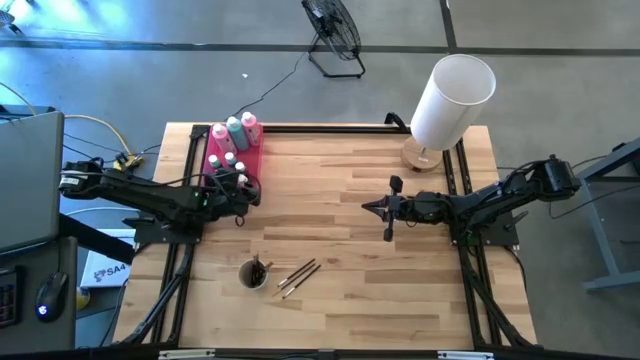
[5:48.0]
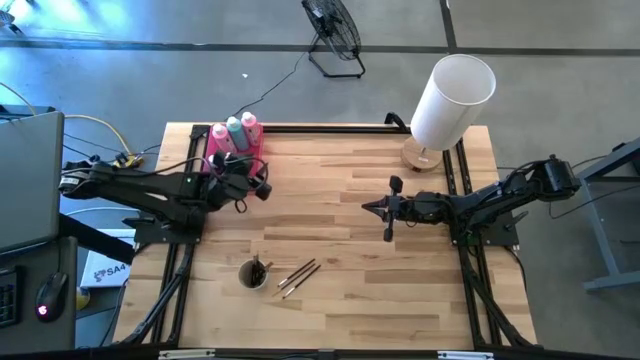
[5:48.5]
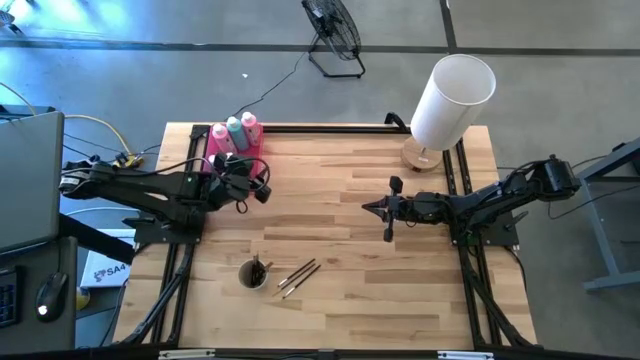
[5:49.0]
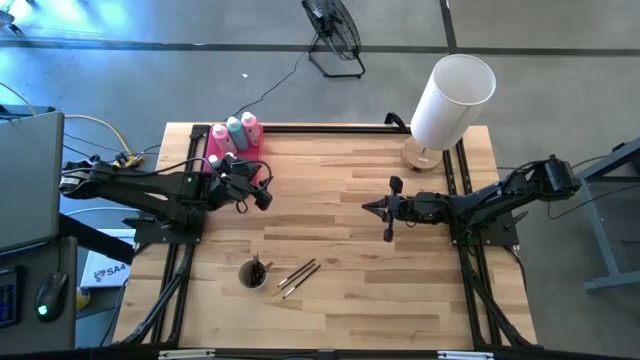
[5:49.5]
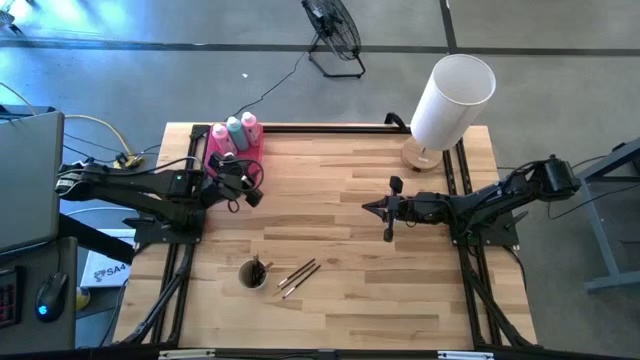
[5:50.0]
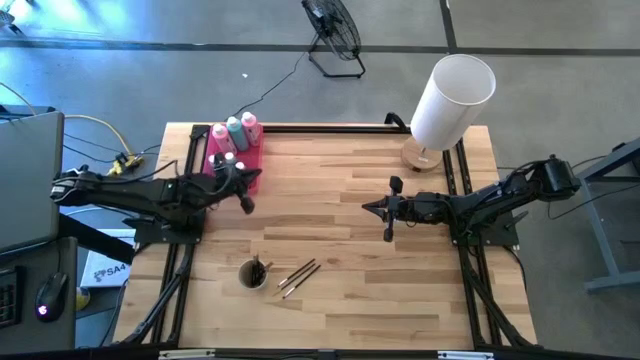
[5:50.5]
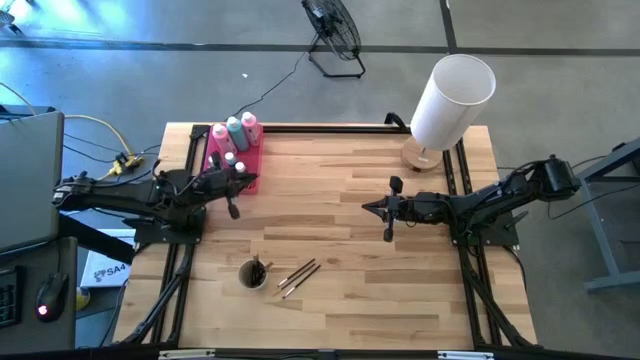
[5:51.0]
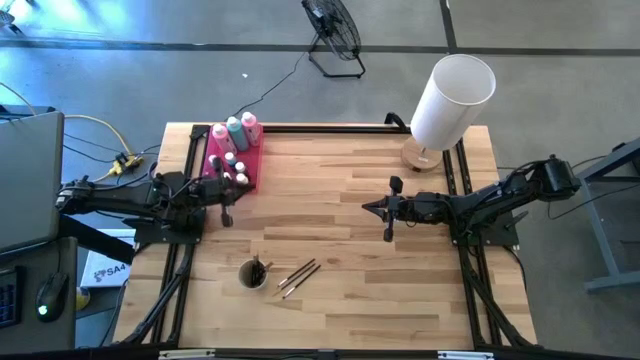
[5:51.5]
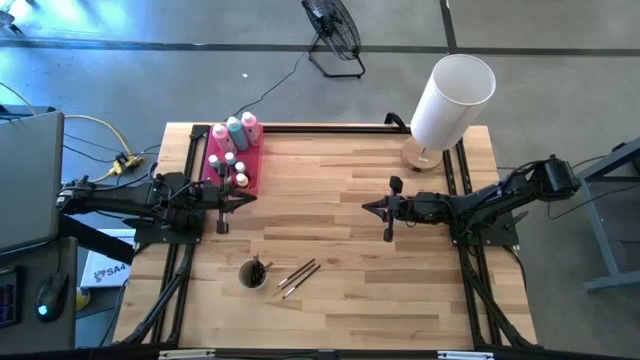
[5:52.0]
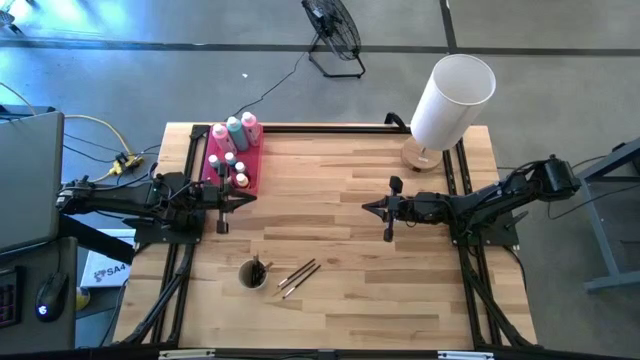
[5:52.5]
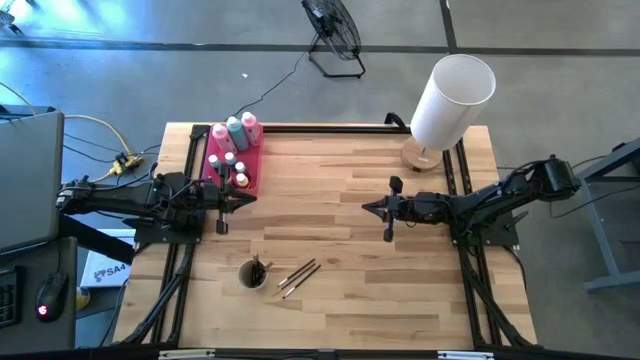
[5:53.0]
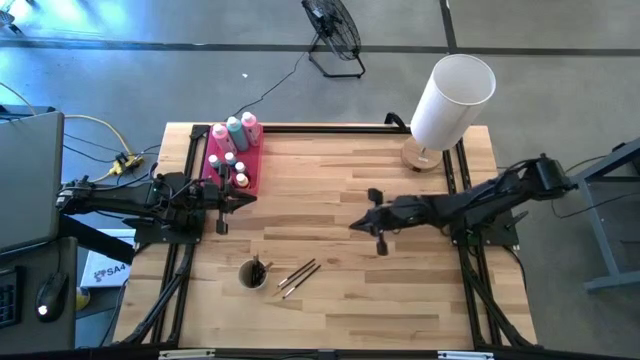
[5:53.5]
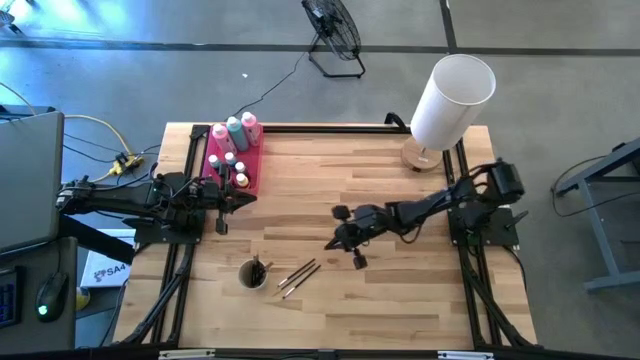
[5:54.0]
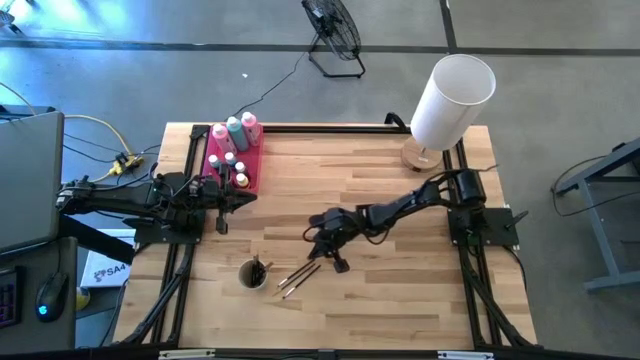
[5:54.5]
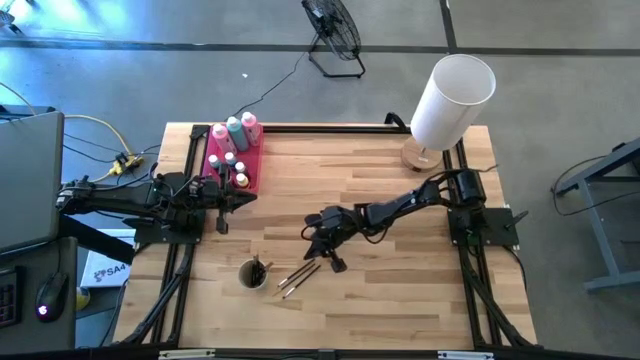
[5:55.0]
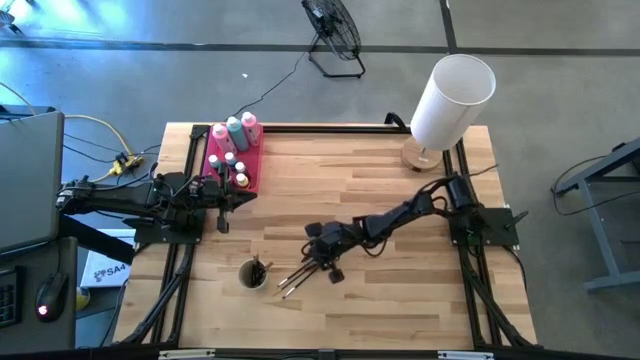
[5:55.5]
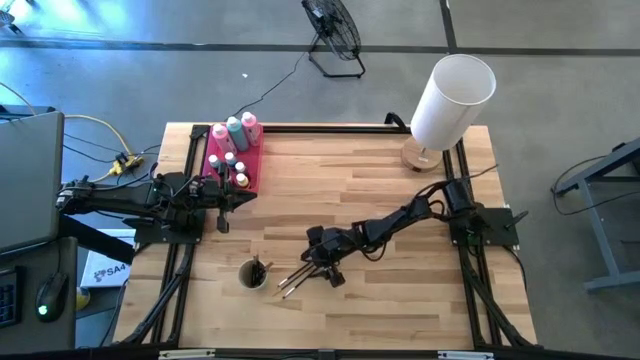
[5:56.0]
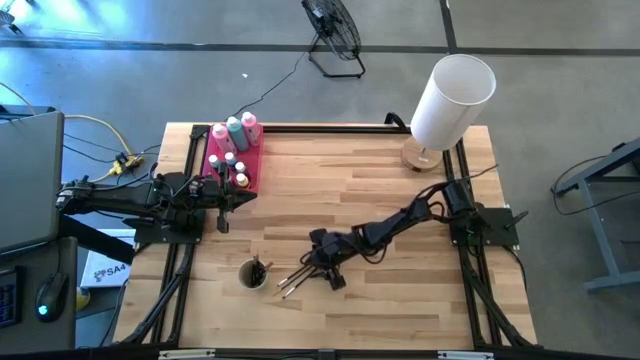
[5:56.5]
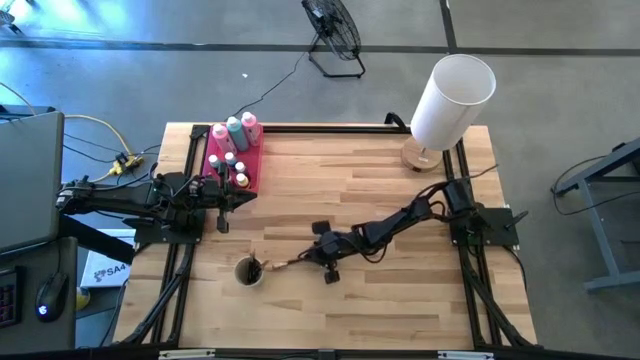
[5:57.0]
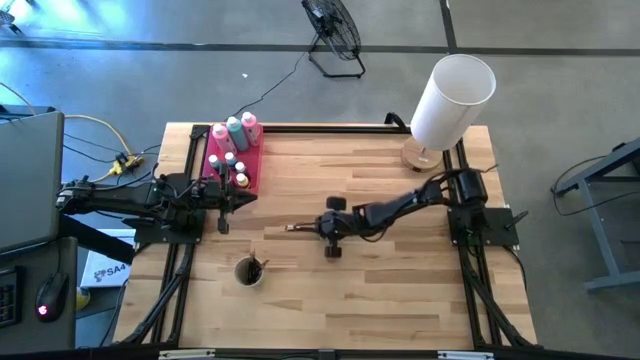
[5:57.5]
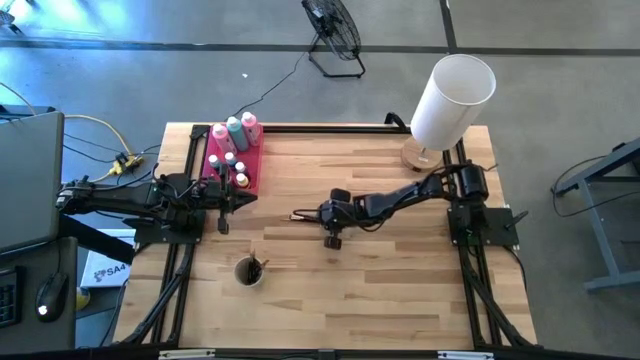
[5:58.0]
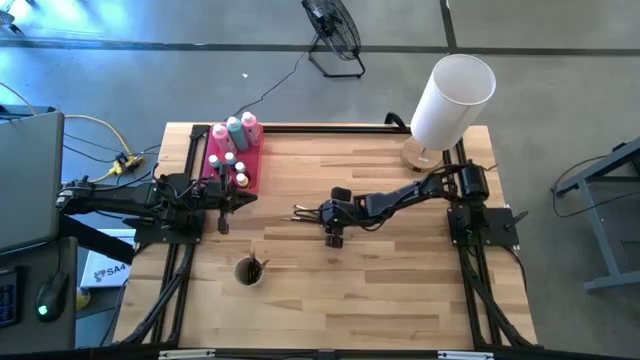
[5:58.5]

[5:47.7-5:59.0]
Task: Pick & Place Paint Supplies
Move the paintbrushes to the center of the table

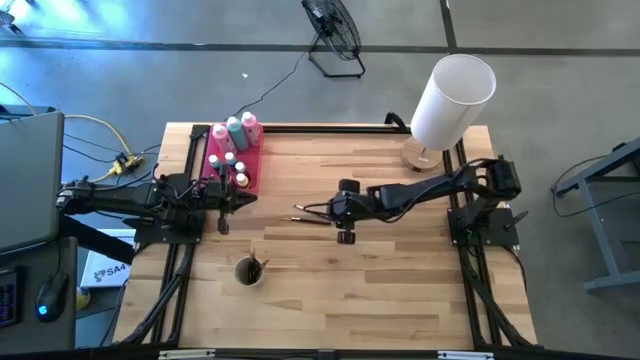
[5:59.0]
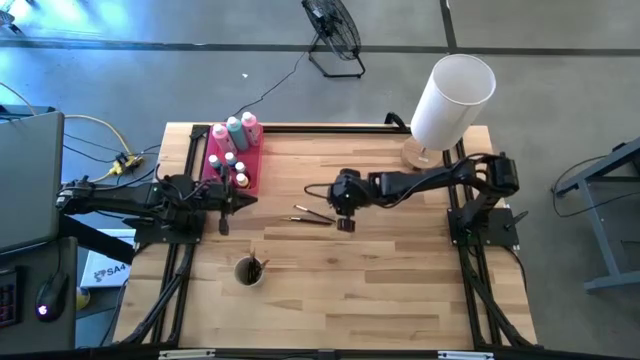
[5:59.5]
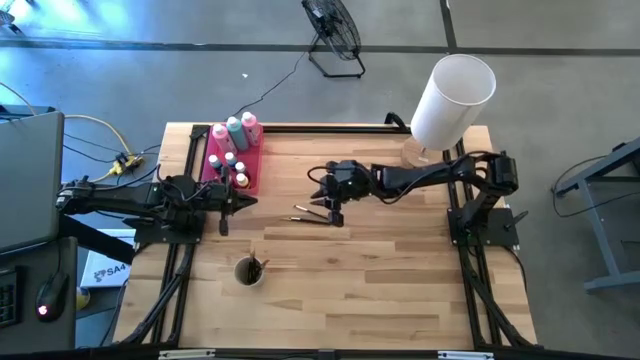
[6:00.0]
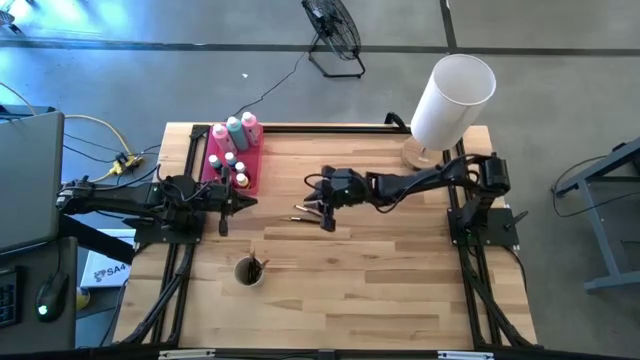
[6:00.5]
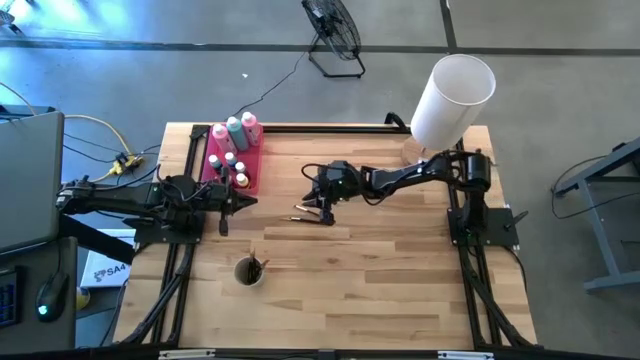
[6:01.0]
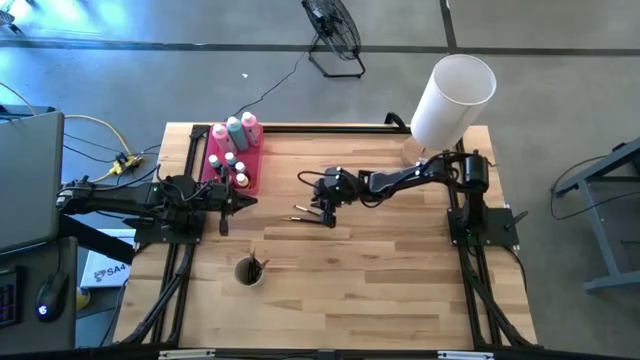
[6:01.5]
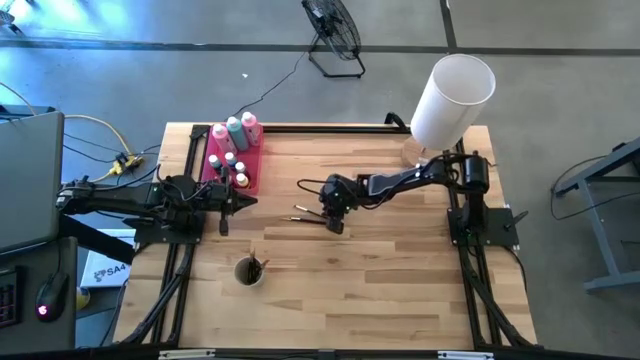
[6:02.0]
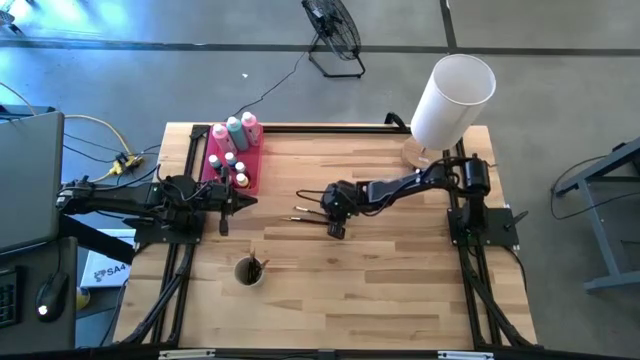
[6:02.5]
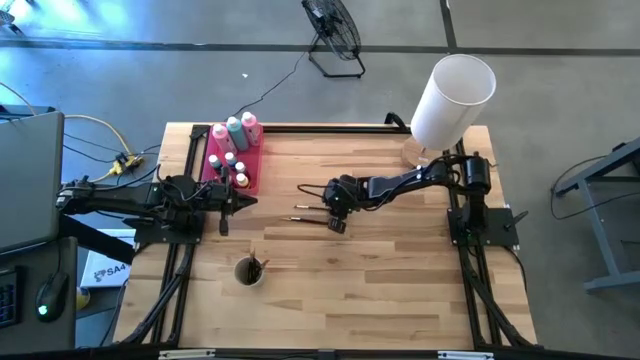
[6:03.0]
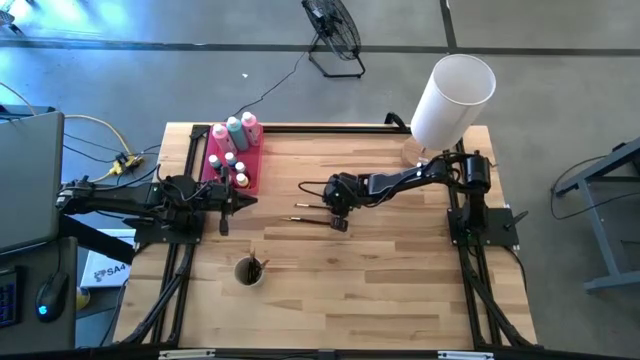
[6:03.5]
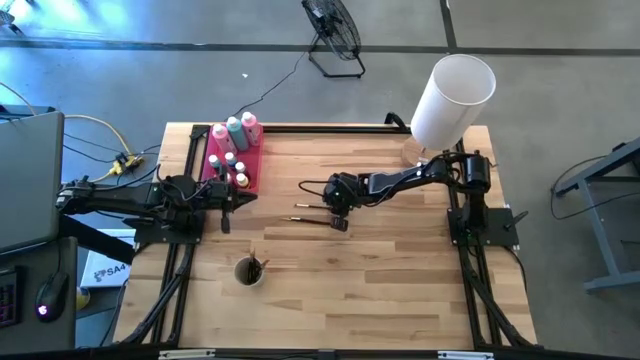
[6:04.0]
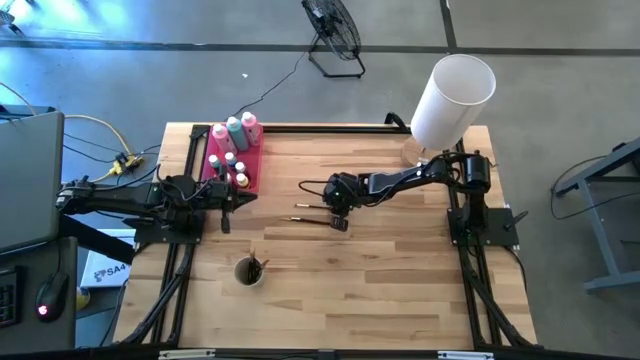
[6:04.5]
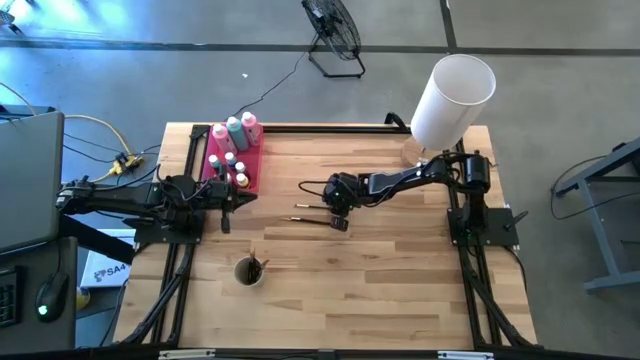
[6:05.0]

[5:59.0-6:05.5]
Put the silver paintbrush into the light brown cup
